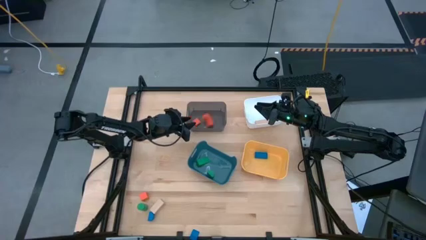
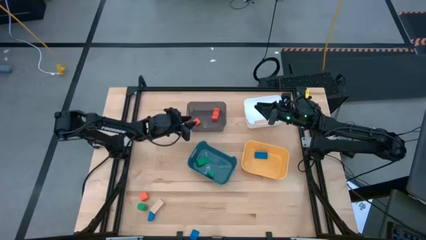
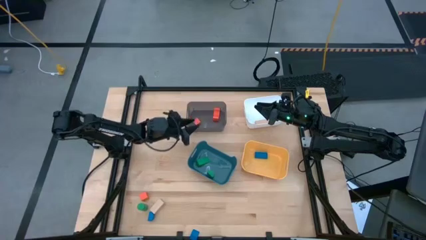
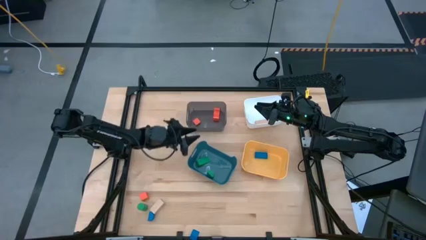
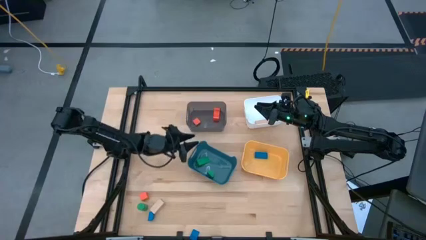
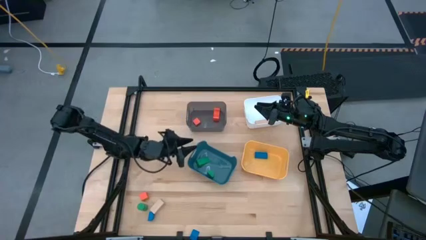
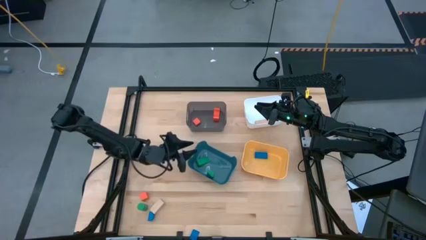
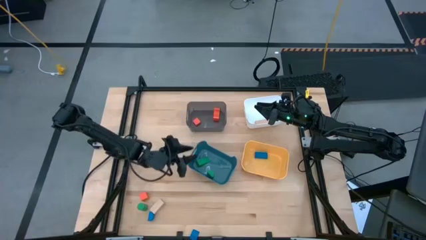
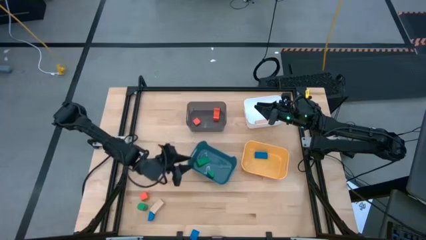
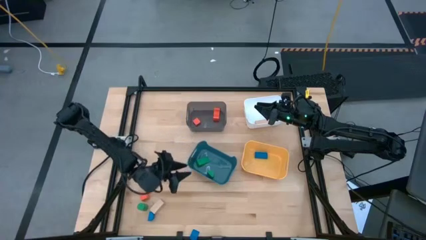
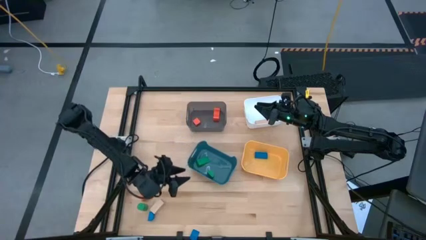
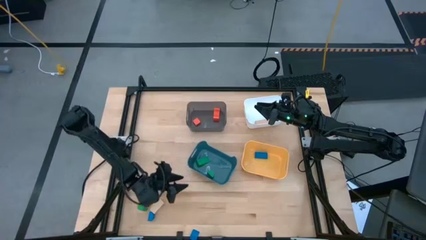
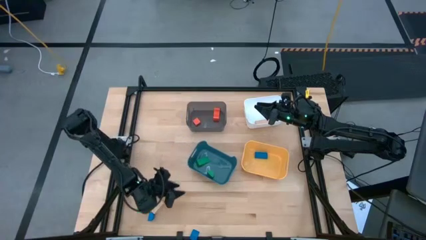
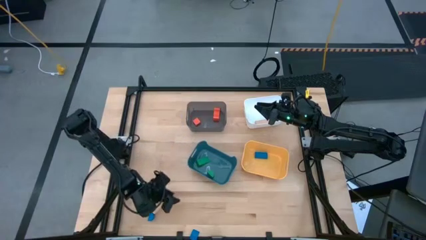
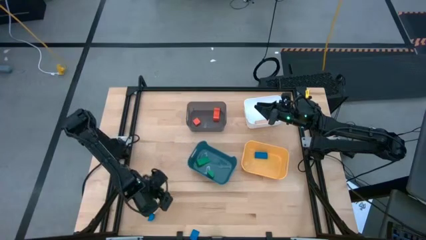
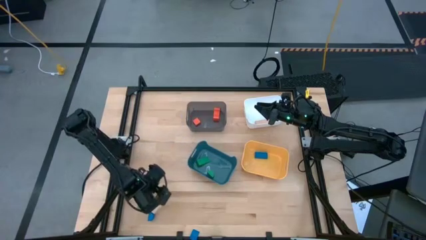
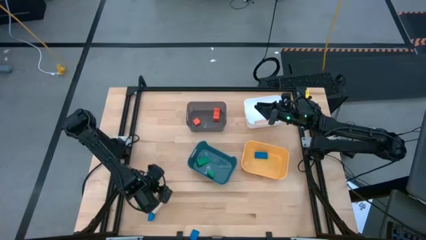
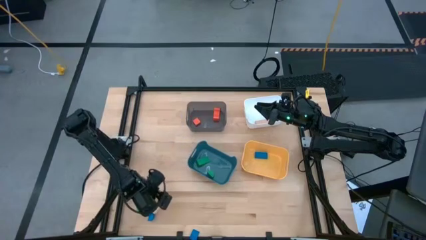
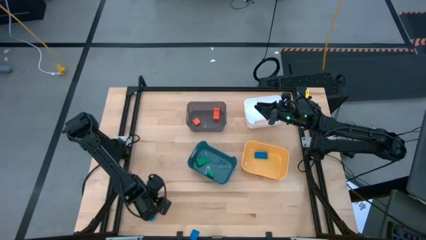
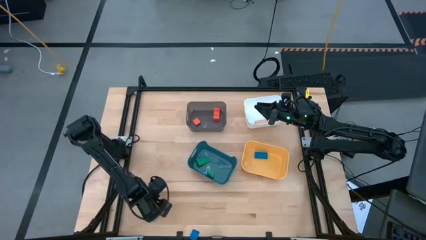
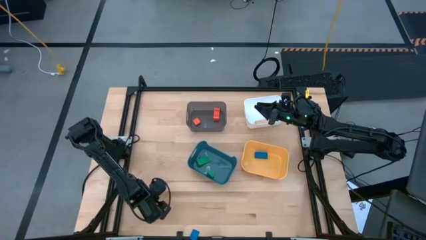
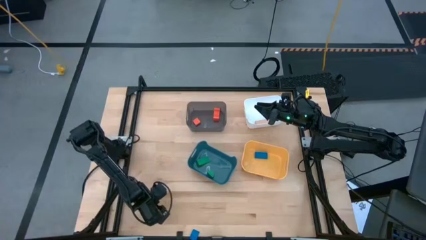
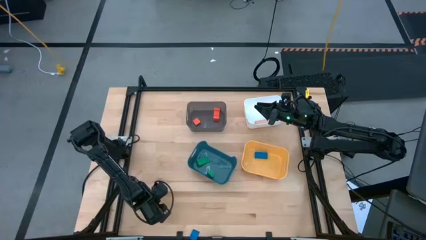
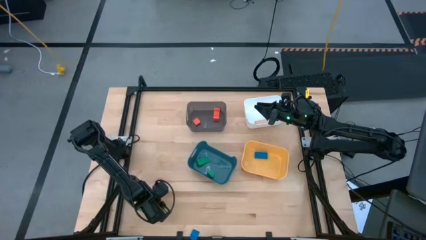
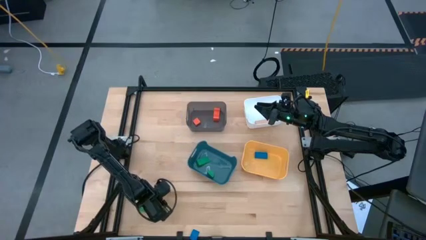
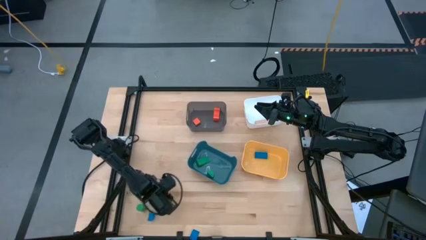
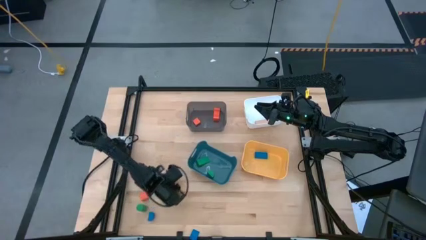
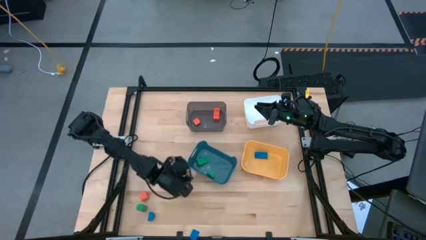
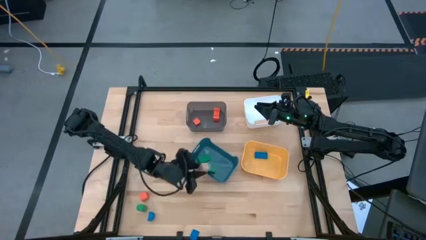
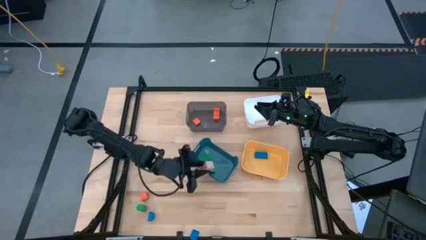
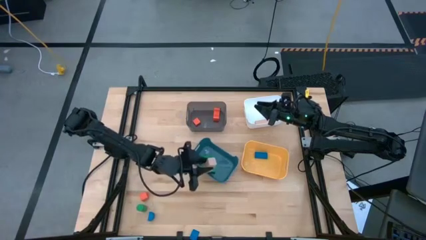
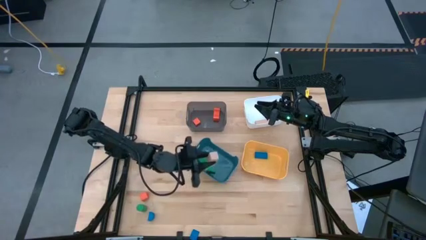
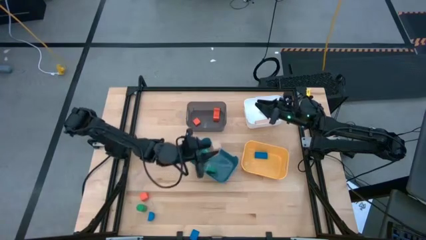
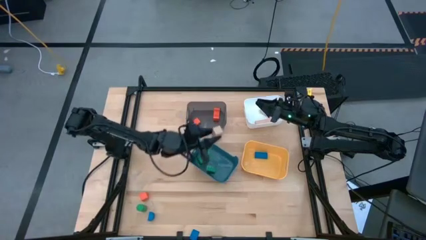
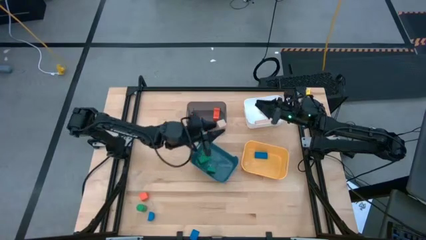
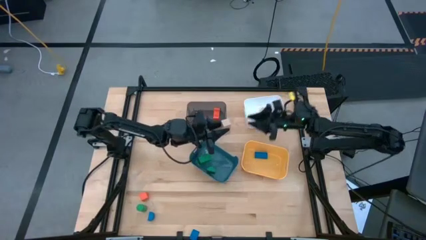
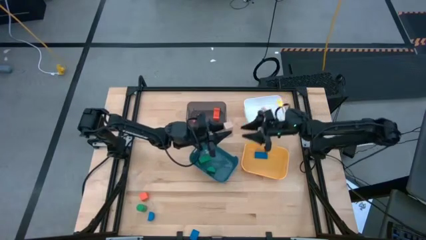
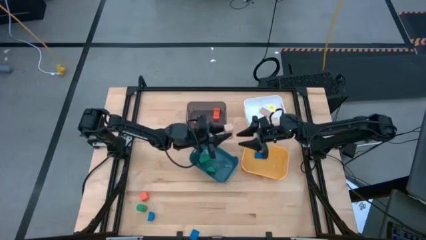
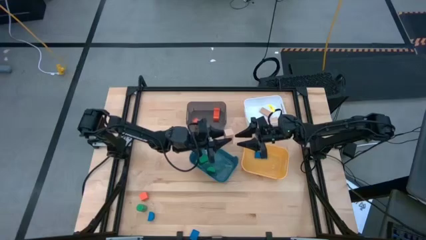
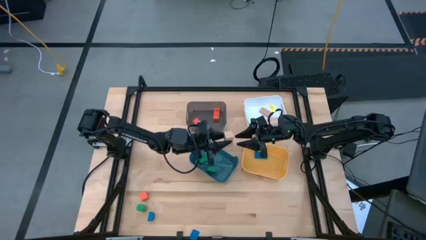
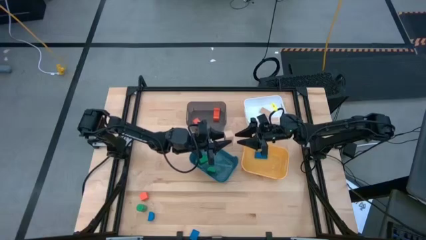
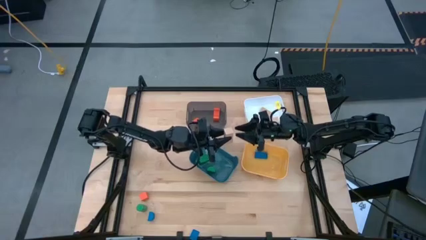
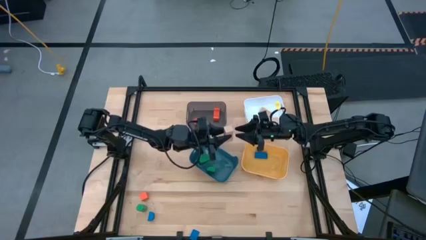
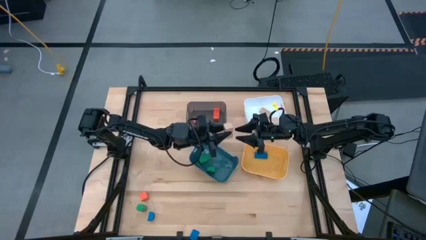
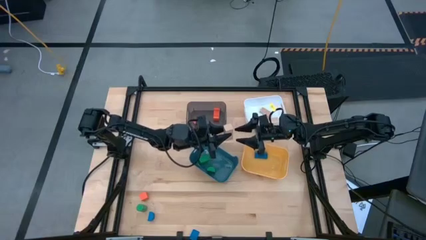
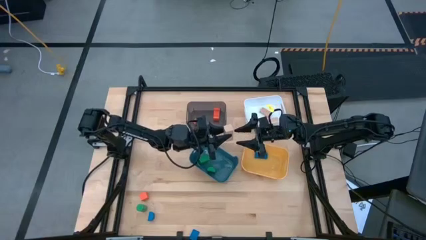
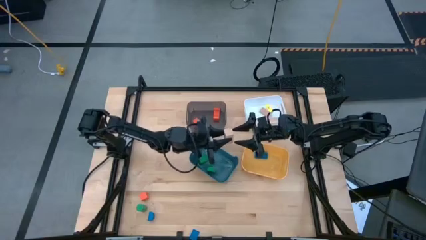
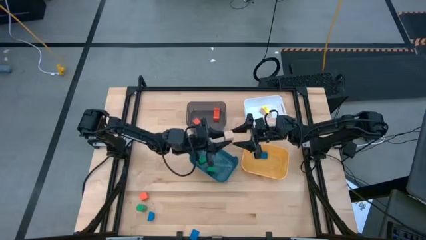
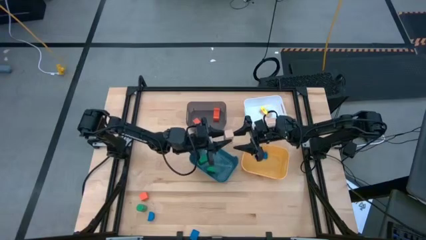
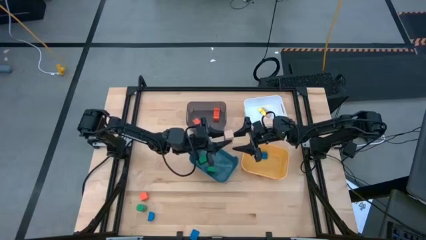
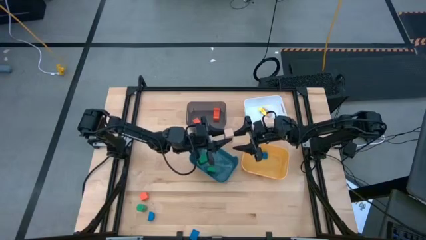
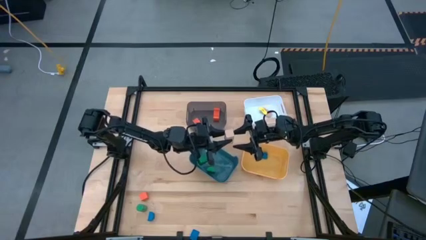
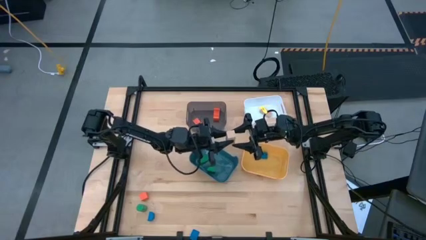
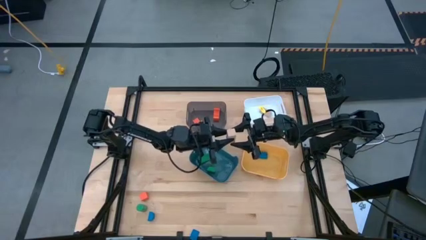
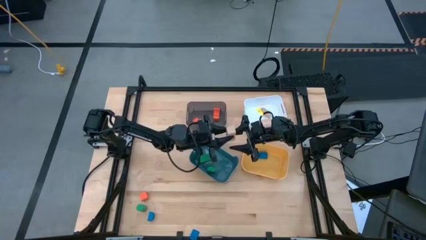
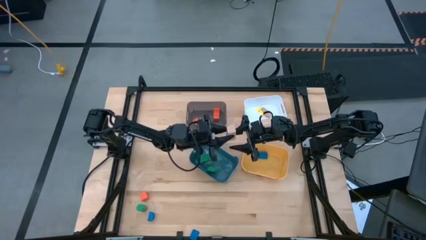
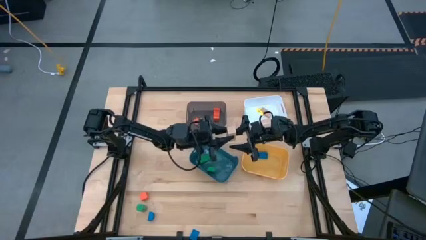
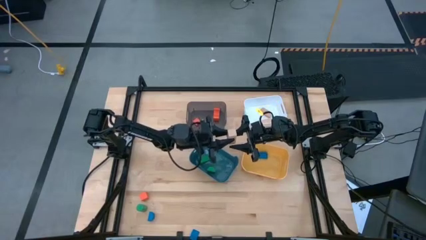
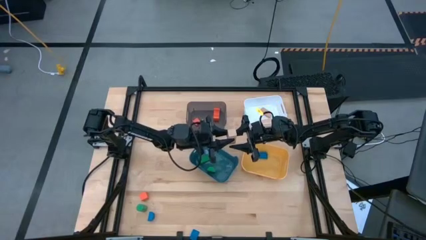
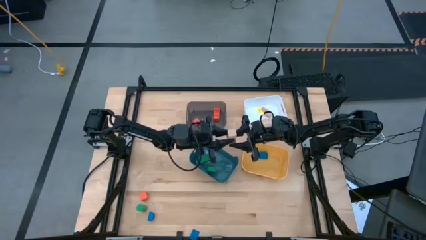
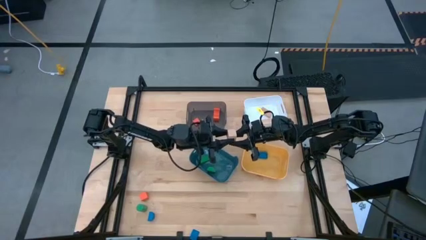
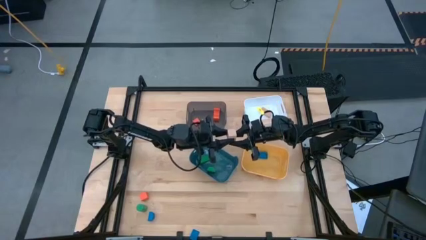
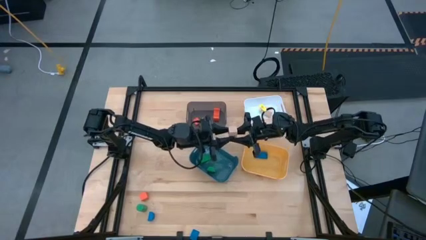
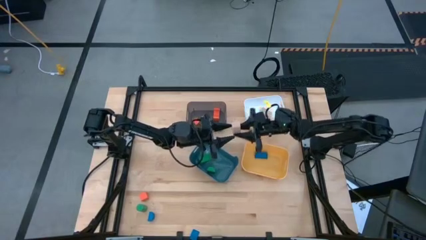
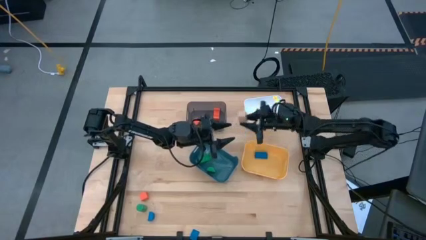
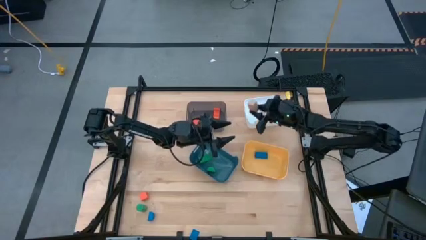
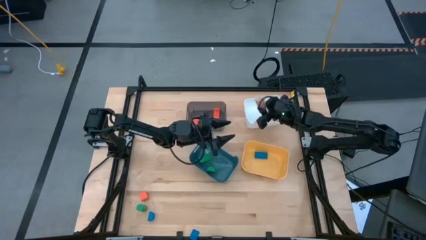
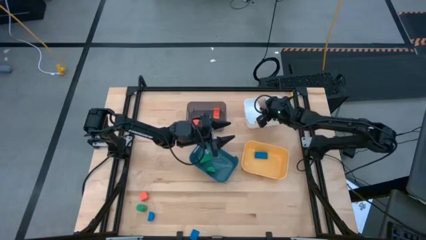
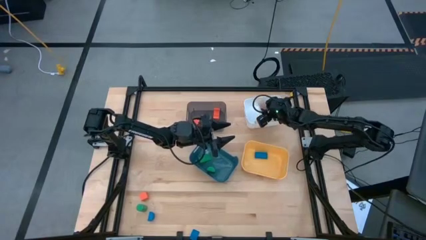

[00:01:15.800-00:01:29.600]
Task: Sort & place blocks by color
Put the brown block into the white bin
